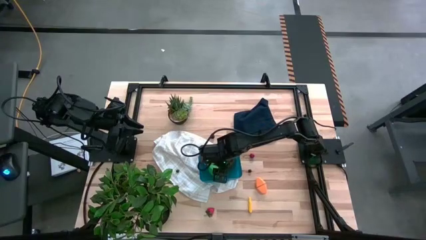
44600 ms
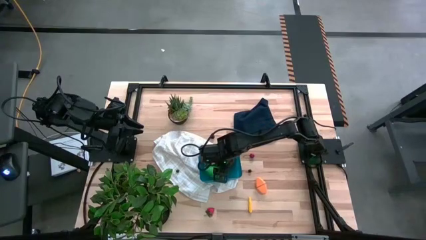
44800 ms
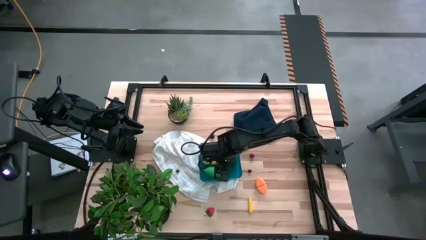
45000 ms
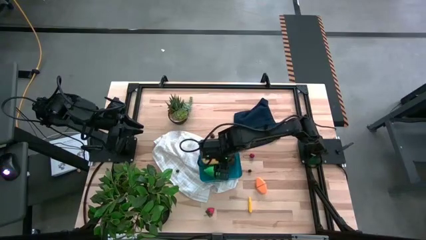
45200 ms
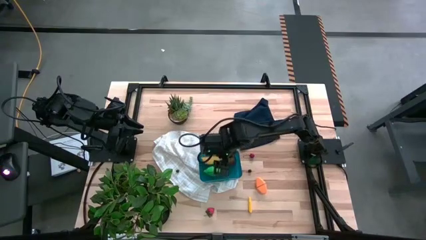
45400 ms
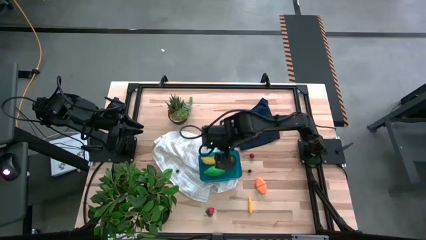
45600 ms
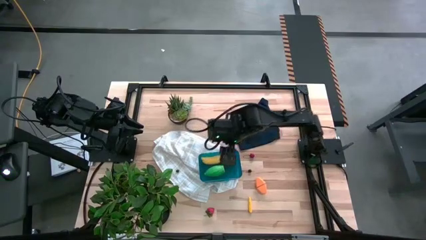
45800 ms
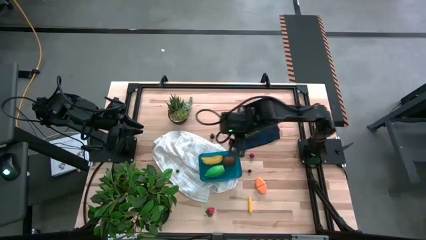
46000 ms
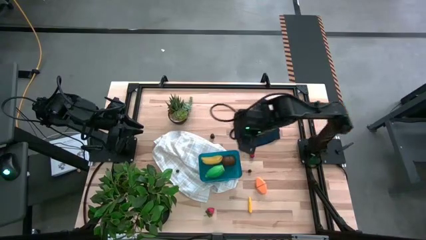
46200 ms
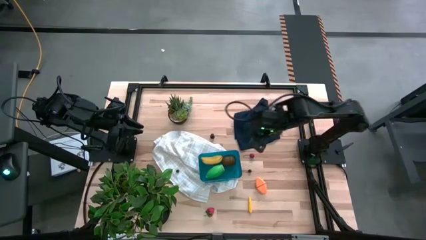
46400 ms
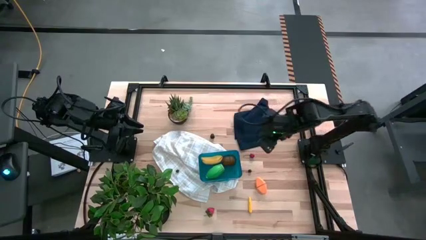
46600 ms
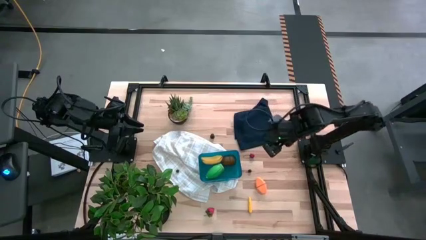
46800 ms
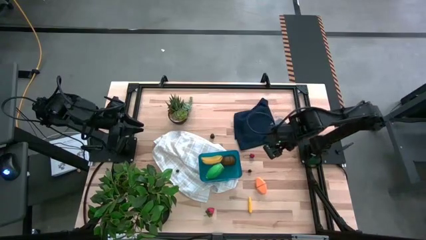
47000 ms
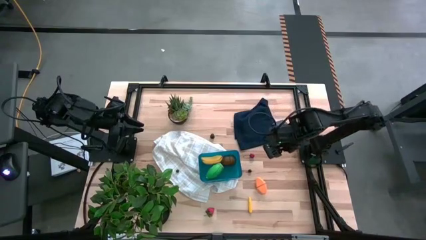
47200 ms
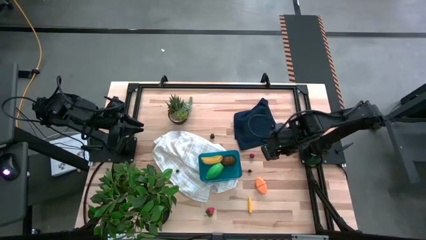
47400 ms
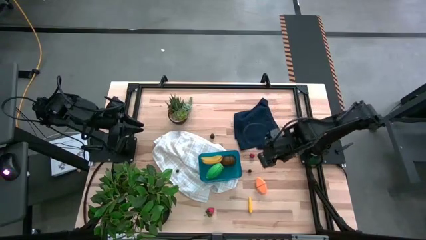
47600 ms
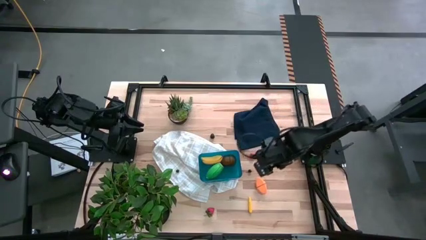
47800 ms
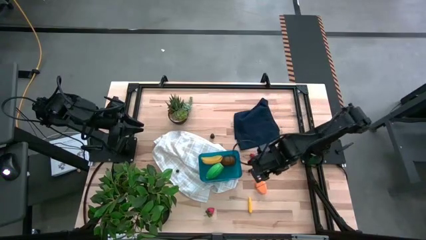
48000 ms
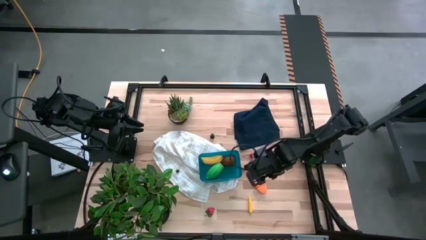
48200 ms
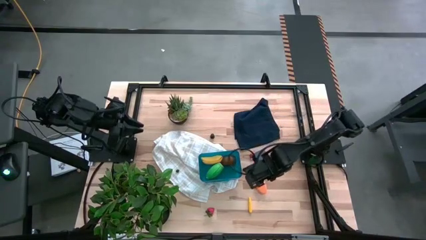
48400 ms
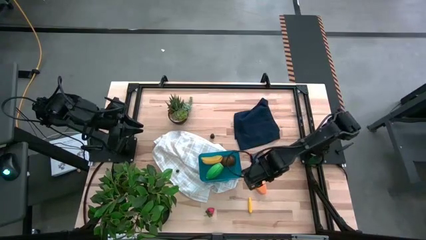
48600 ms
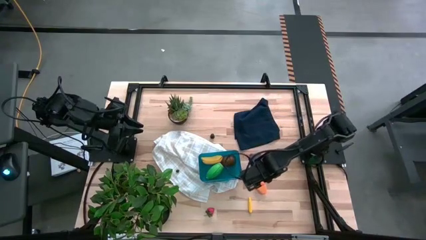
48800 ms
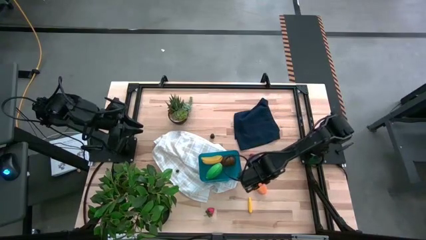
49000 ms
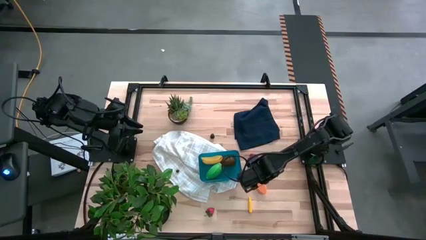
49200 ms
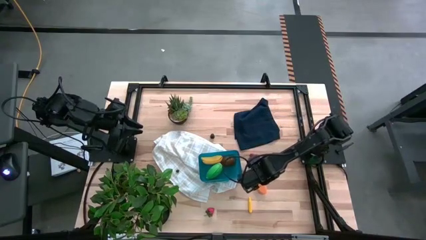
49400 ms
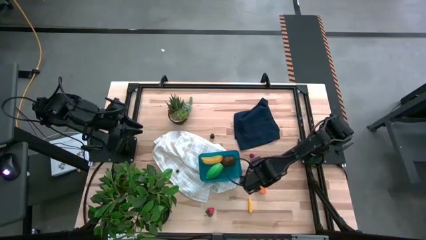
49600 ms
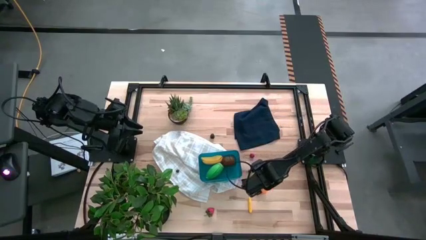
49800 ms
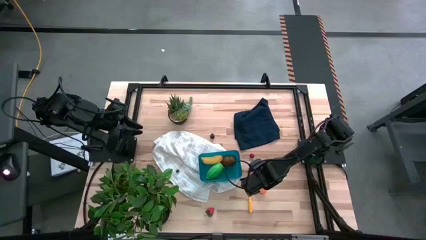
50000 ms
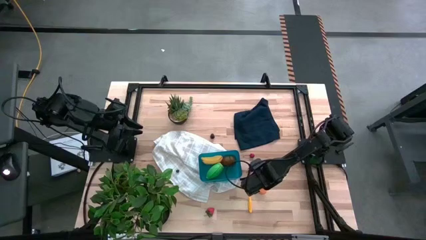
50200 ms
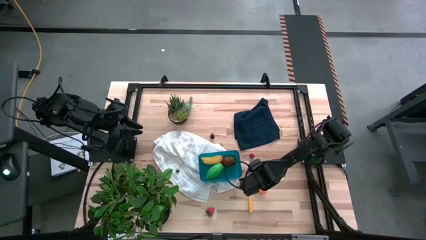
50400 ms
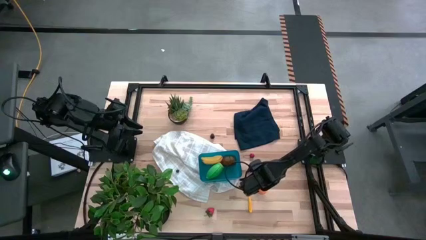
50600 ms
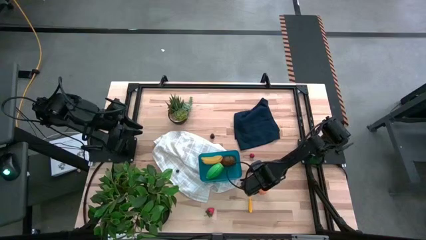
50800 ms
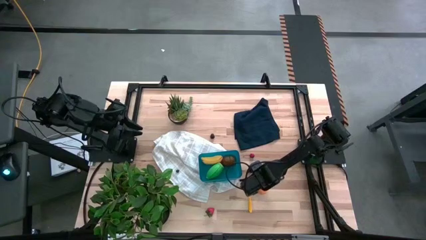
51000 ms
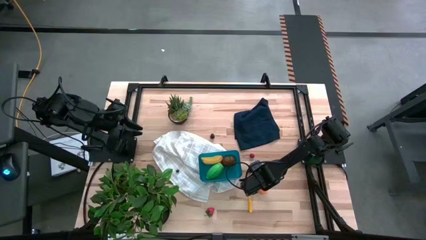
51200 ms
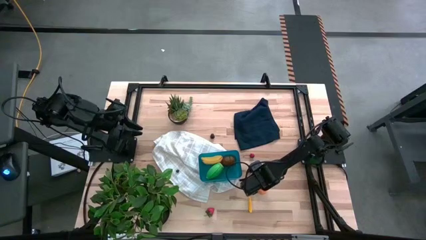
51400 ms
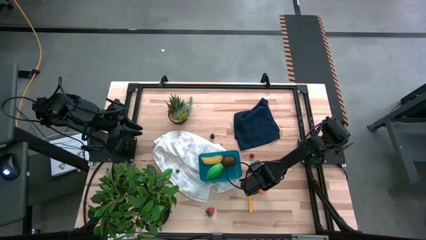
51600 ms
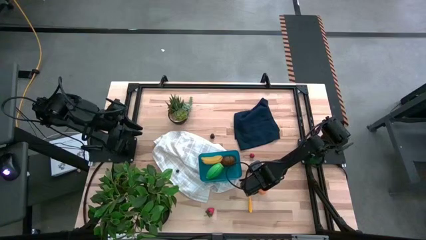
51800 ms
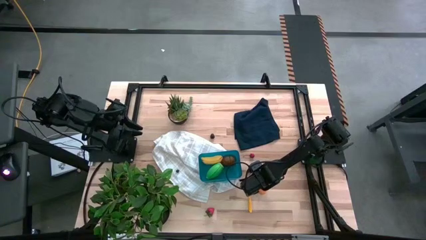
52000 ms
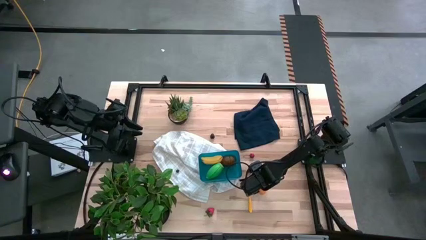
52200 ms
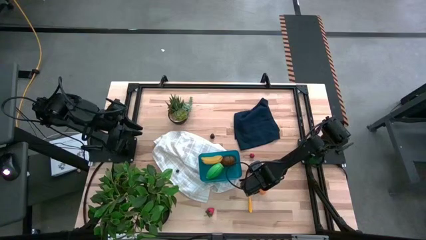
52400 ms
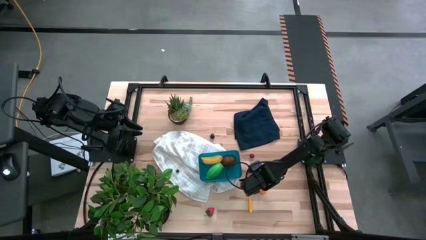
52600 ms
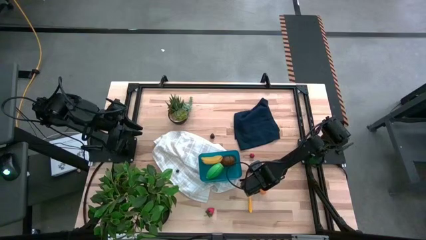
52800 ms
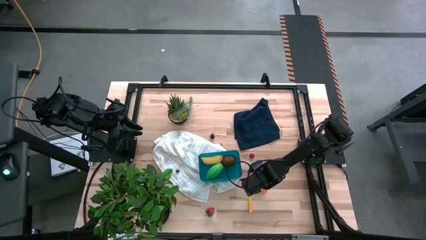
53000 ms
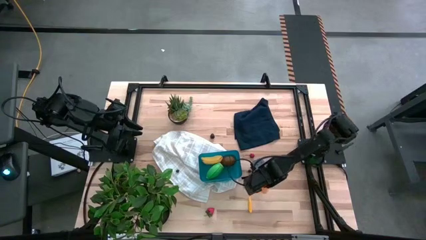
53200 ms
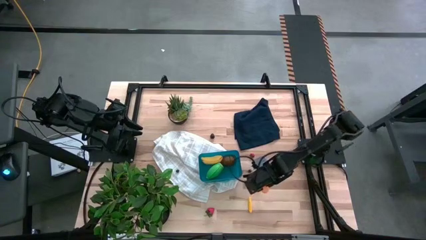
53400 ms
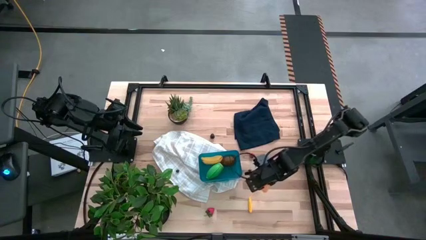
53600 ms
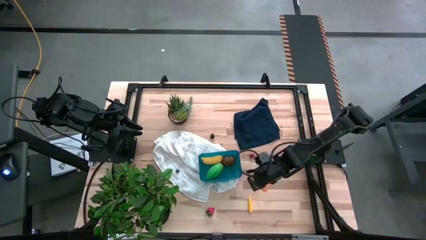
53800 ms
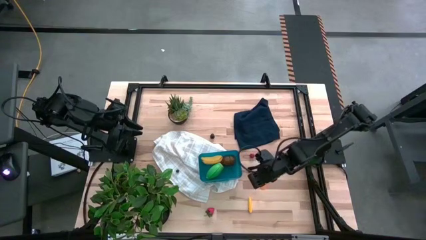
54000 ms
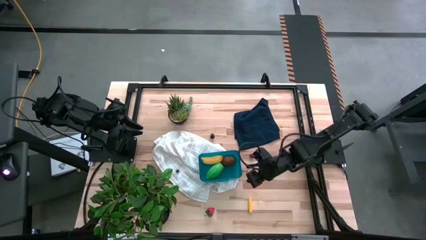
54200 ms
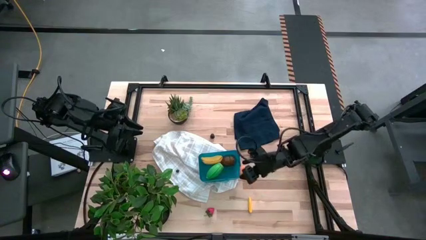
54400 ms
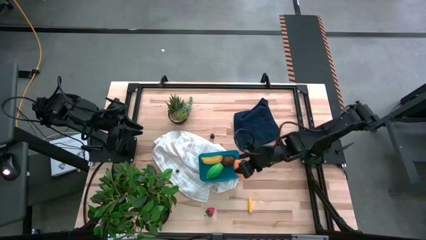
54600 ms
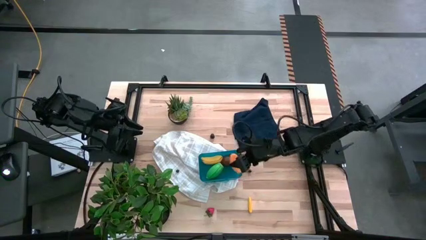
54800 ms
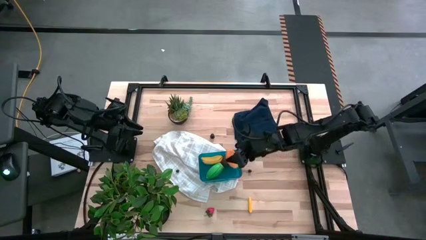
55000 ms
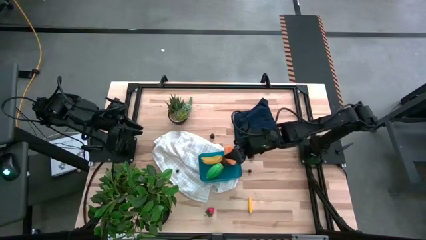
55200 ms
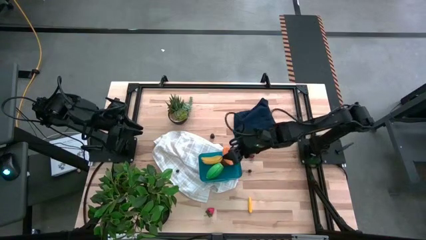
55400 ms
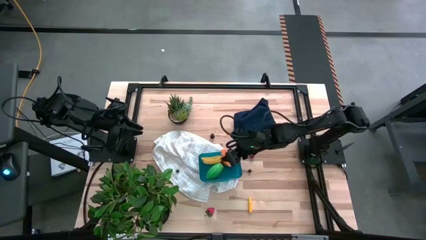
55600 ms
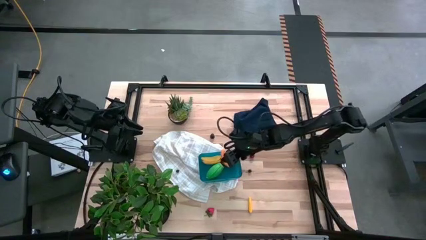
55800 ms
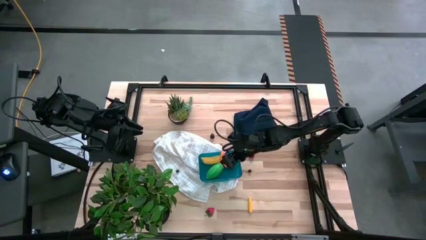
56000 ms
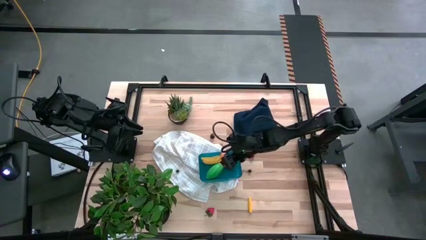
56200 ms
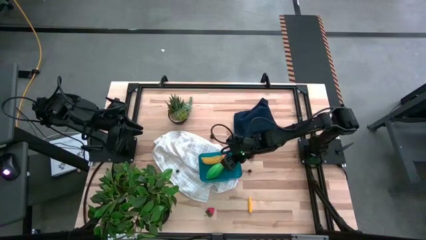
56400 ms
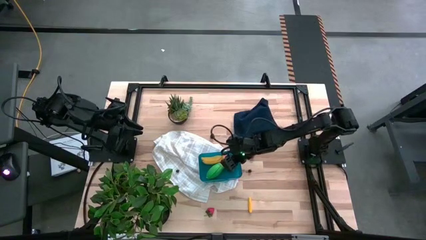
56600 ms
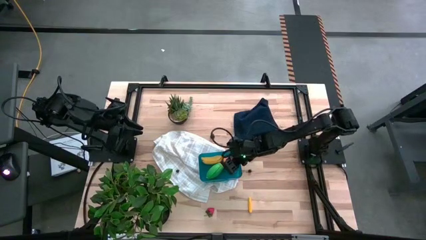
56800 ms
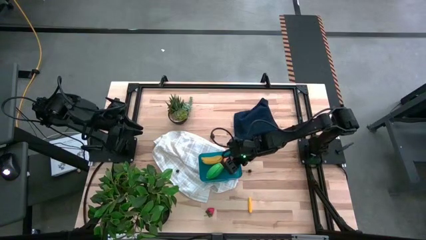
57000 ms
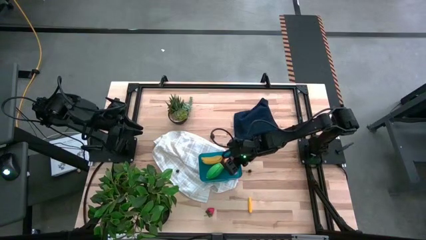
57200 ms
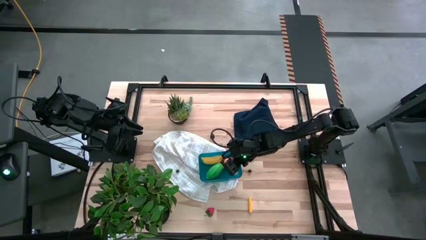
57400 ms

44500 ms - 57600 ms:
Task: Pick and placing Produce into tupperware
Put the yellow croissant into the blue bin

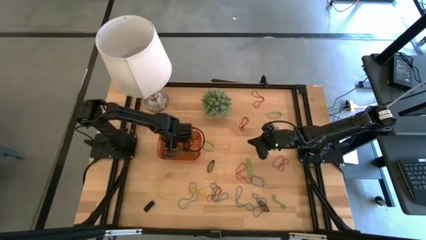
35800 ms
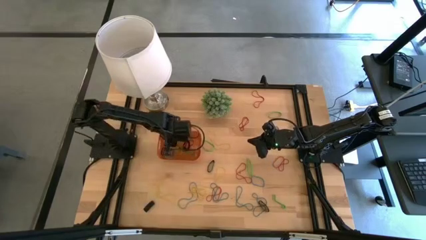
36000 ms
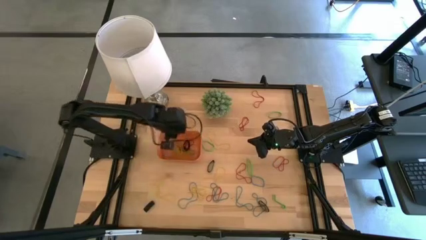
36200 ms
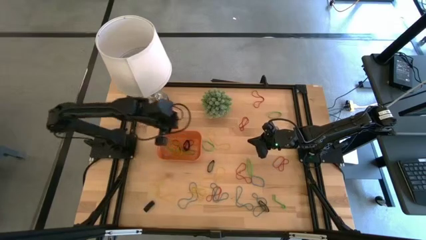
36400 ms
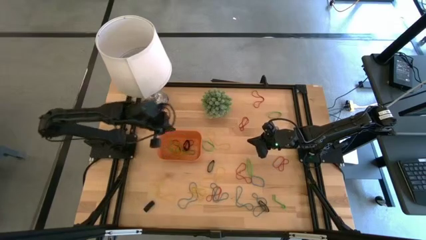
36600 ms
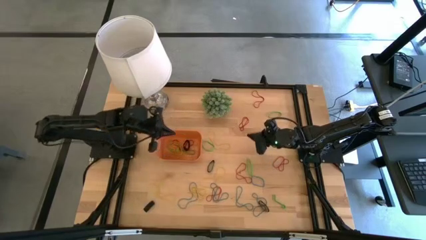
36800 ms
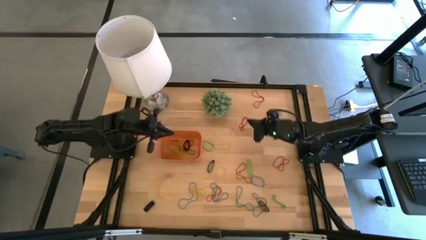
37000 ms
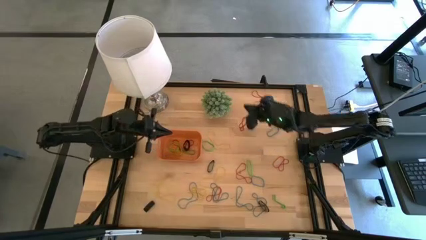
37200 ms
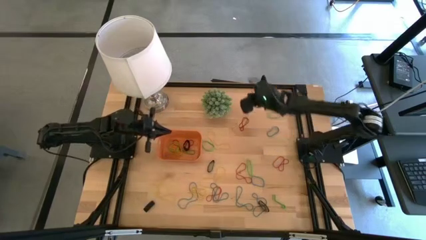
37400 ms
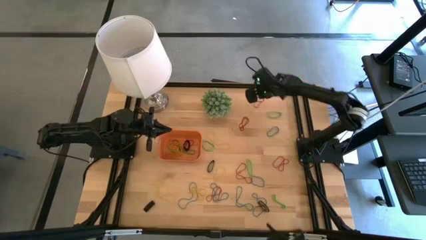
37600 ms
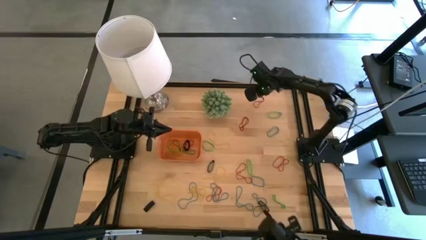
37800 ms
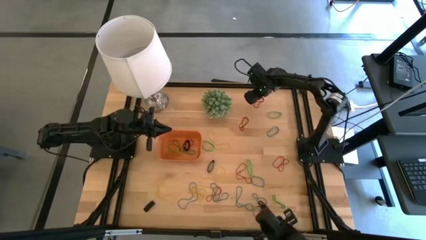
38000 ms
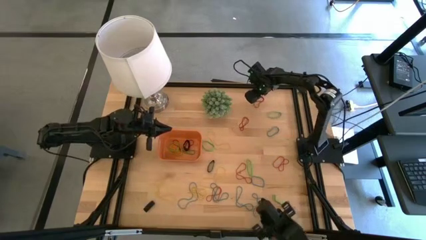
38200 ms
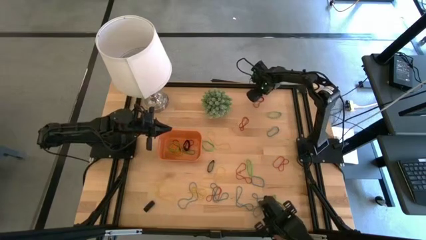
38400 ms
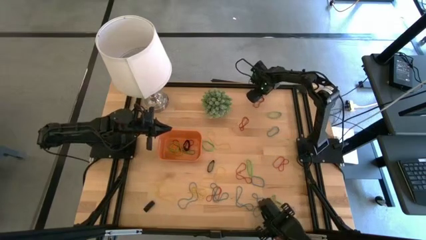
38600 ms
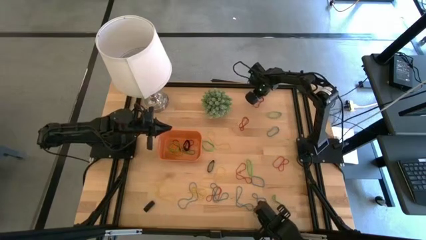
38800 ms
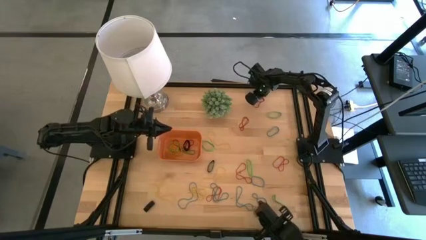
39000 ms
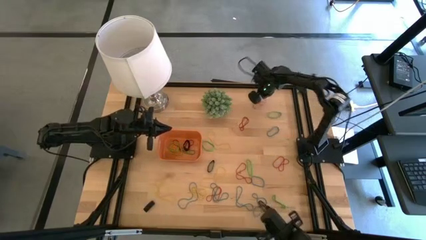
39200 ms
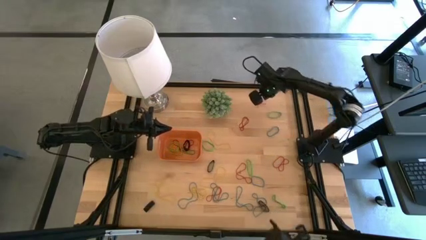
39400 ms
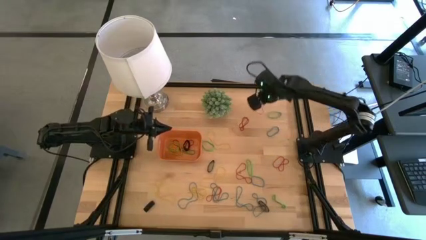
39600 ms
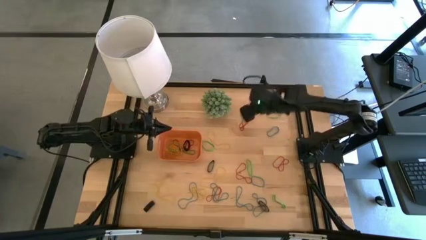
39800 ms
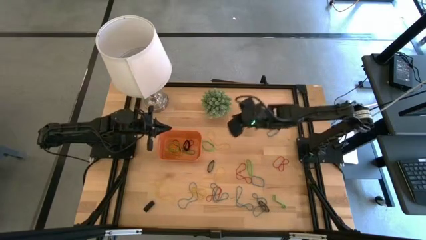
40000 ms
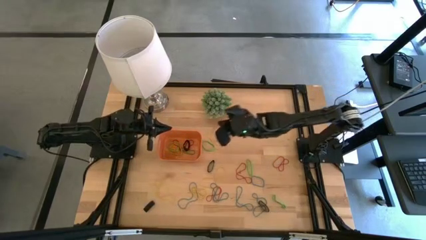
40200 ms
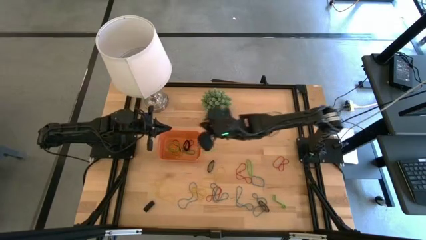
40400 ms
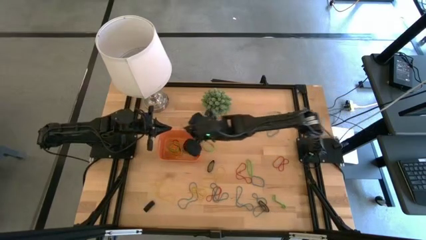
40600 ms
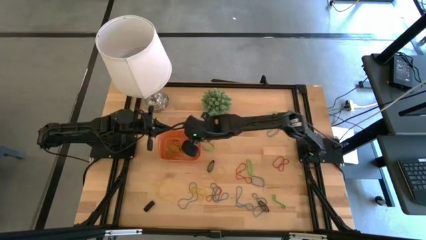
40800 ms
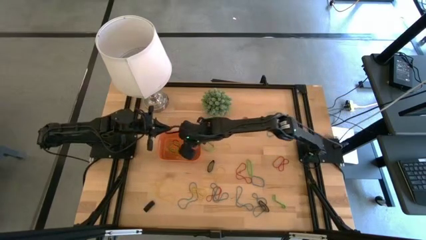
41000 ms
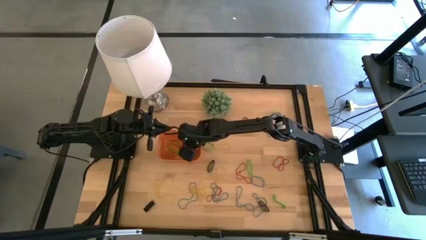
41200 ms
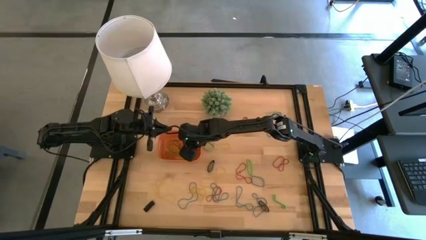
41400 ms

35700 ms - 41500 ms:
Task: Pick and place rubber bands into bin
Put the red rubber band into the orange bin
